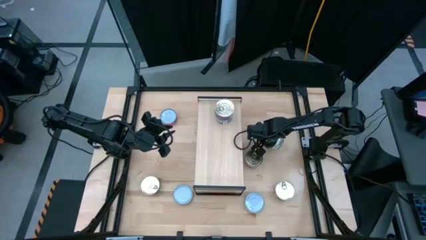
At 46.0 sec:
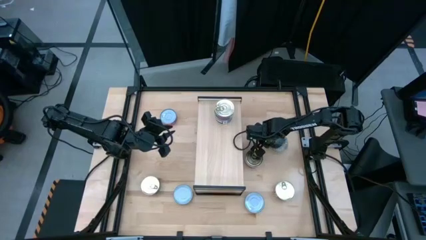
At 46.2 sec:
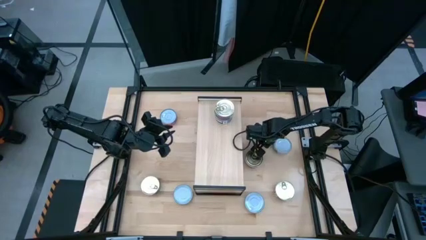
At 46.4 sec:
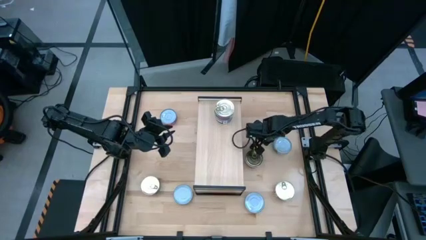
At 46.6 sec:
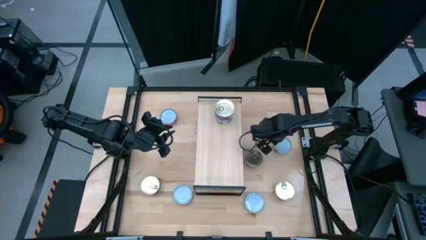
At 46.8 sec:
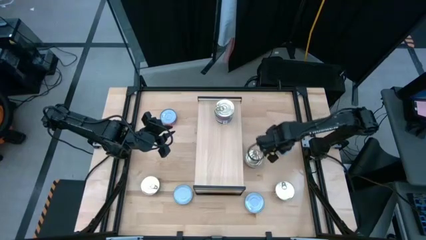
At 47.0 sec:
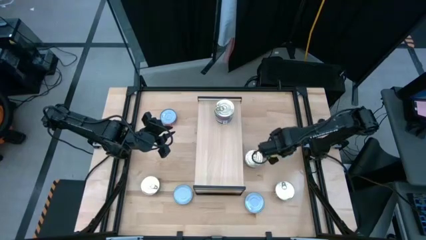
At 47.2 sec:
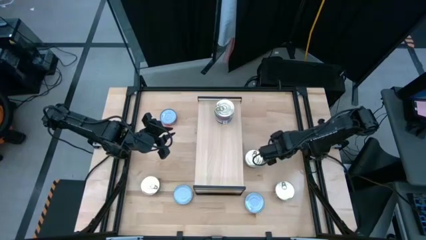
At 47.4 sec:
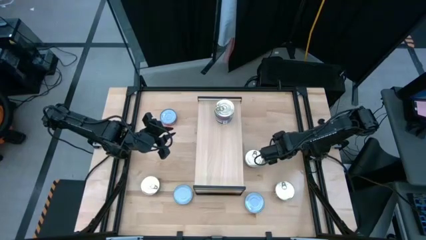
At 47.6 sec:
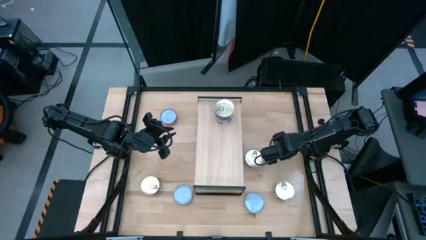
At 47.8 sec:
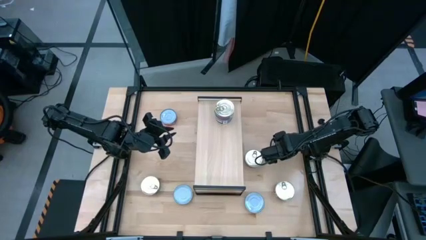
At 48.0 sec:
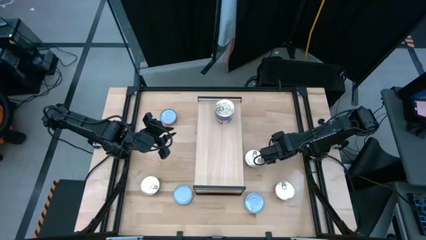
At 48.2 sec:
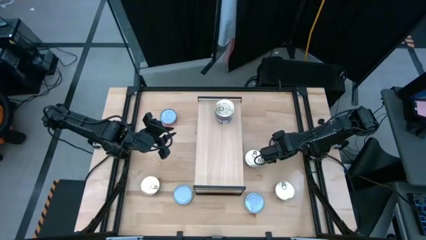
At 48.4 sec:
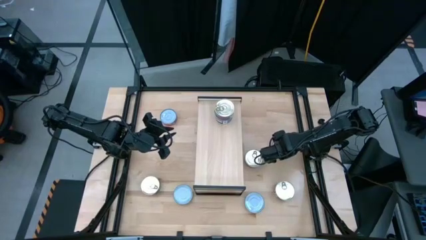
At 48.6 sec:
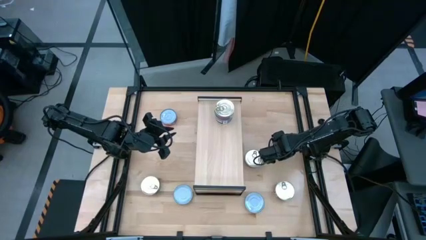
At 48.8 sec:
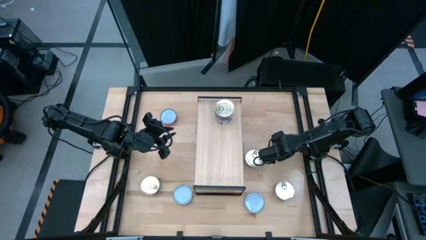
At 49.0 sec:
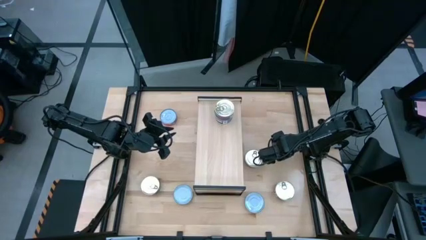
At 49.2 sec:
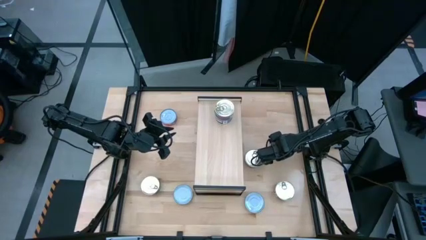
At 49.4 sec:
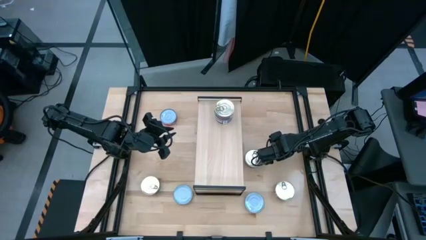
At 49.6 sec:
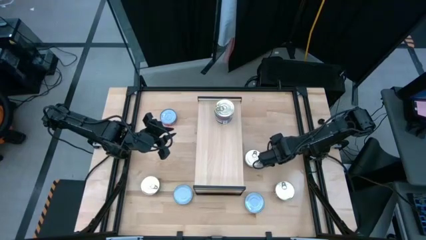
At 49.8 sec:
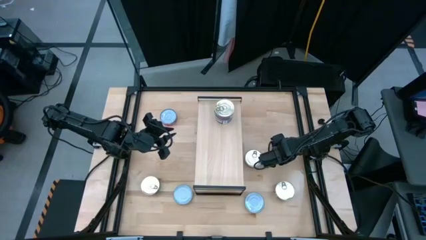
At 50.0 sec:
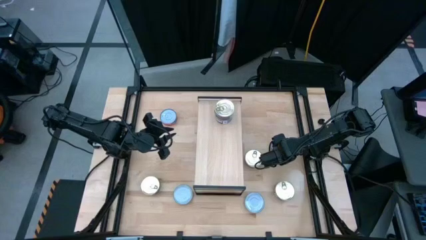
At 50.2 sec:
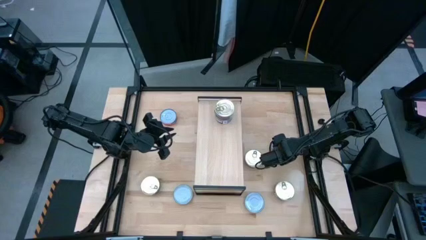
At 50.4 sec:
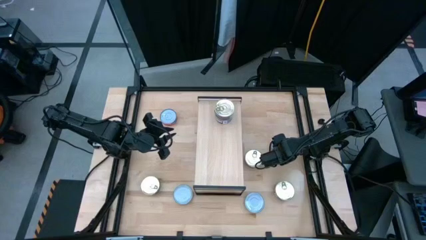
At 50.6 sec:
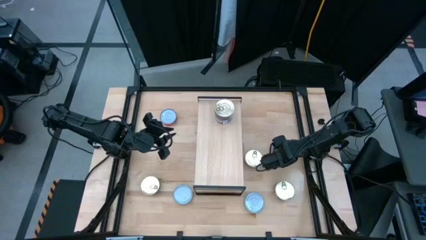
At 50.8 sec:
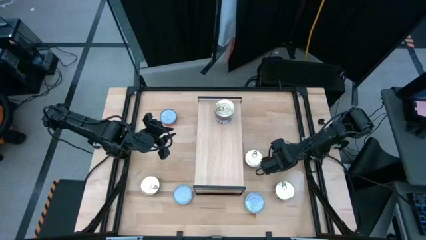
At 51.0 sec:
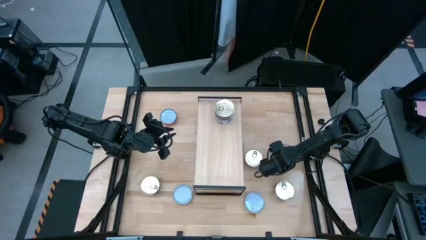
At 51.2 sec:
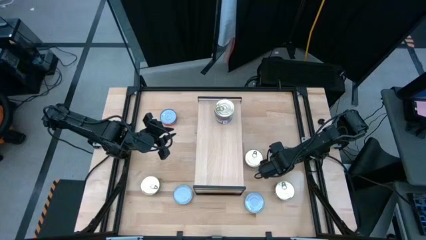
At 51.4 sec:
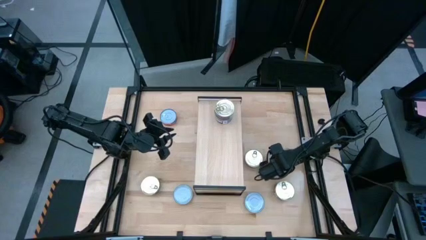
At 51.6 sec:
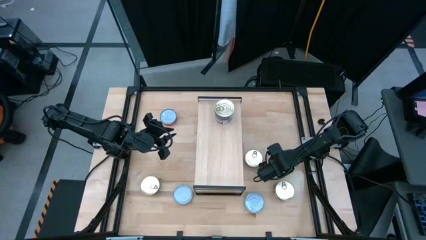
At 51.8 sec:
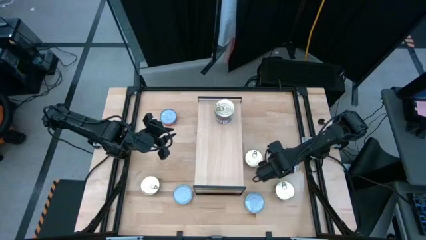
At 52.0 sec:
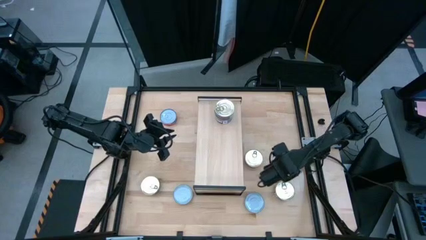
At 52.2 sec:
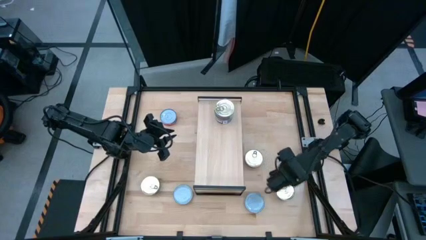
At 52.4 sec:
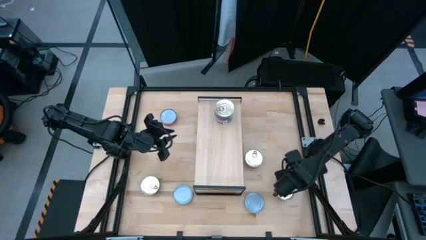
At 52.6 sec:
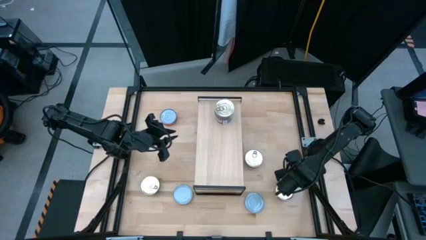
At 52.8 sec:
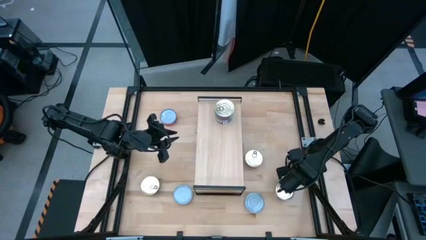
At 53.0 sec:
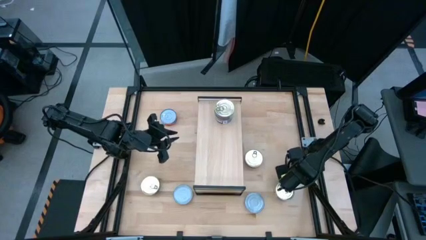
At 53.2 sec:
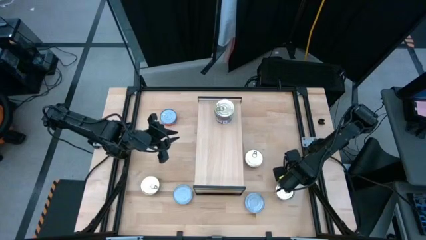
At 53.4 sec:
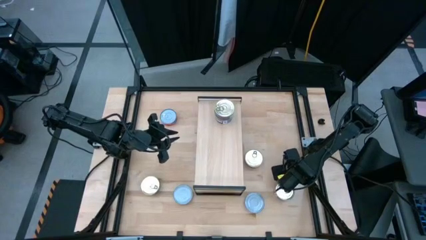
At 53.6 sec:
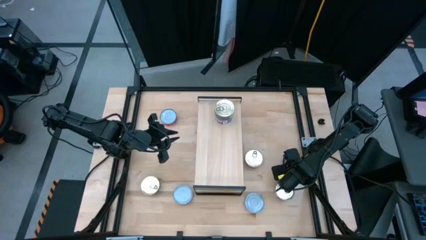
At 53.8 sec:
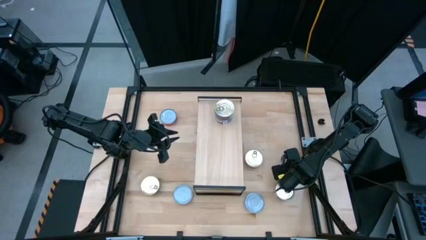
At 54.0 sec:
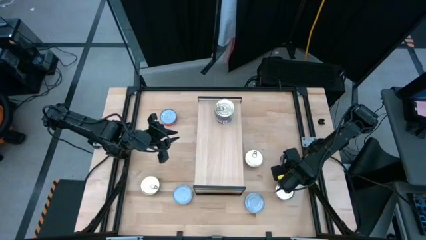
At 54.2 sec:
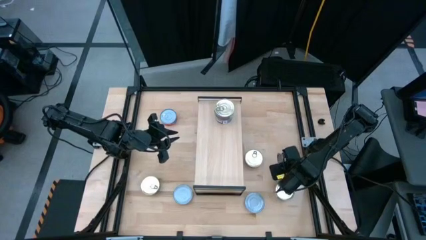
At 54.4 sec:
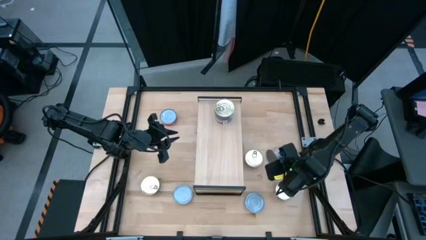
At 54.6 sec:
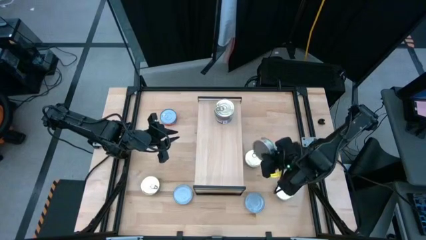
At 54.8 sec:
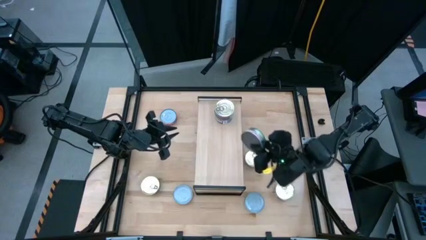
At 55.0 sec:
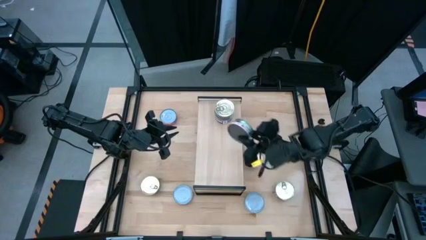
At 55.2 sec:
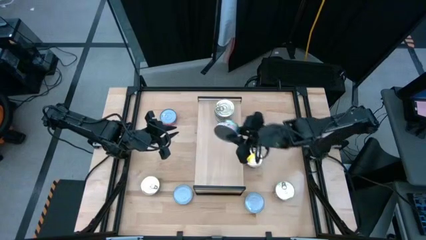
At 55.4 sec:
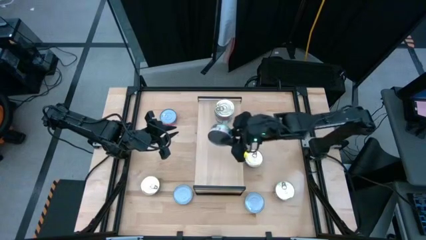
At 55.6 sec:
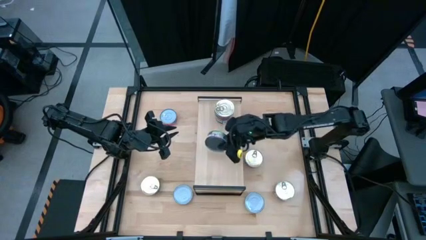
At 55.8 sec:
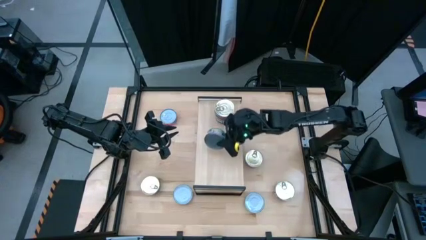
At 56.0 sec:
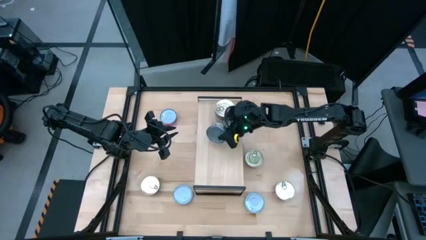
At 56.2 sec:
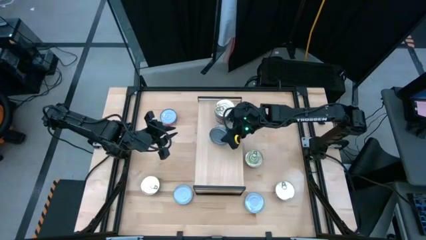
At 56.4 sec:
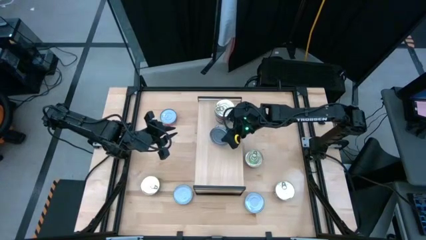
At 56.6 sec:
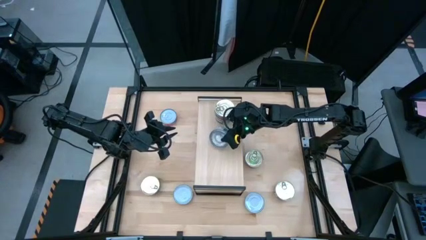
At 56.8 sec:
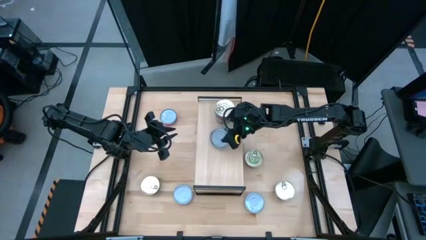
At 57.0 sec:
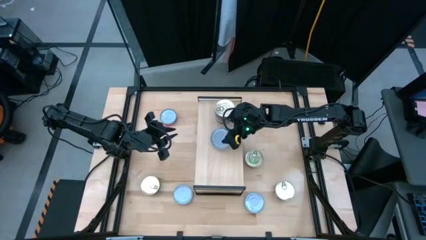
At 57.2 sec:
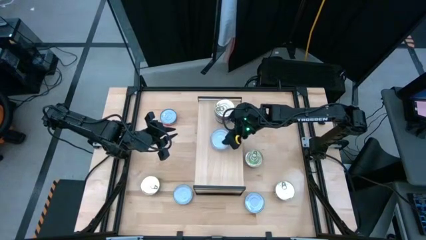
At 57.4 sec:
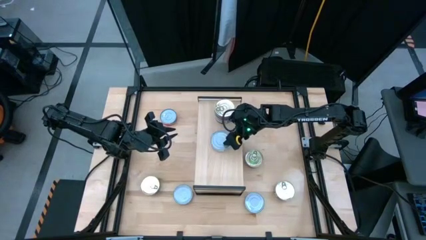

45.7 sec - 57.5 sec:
Task: Stack canned seafood by type on shelf
Put the green white tuna can on the shelf

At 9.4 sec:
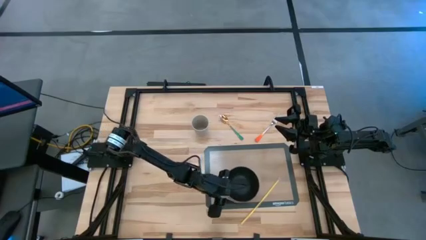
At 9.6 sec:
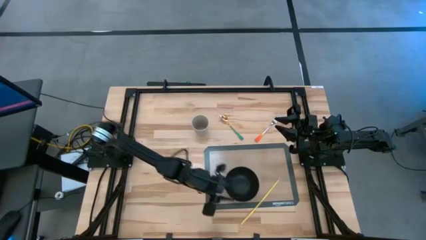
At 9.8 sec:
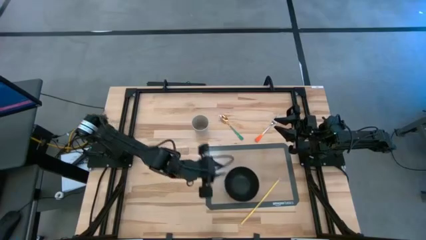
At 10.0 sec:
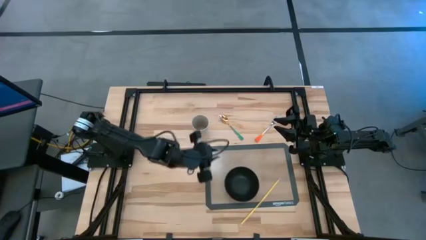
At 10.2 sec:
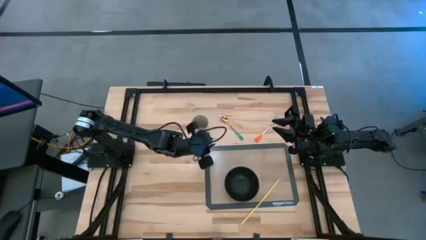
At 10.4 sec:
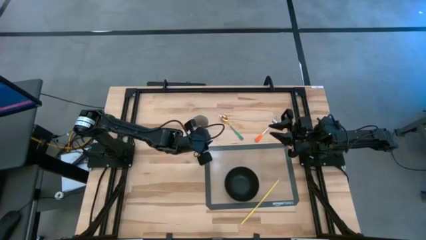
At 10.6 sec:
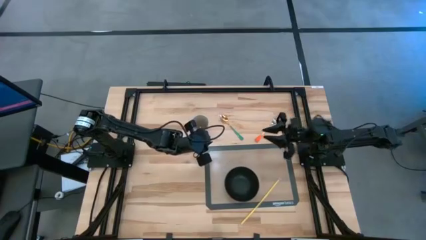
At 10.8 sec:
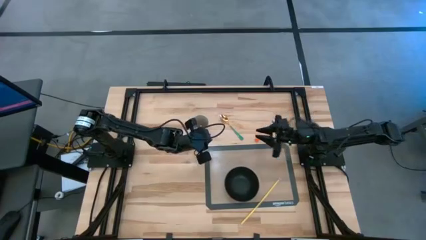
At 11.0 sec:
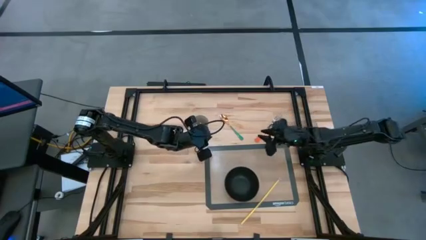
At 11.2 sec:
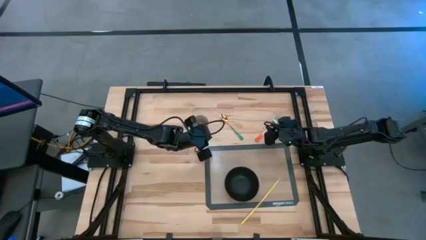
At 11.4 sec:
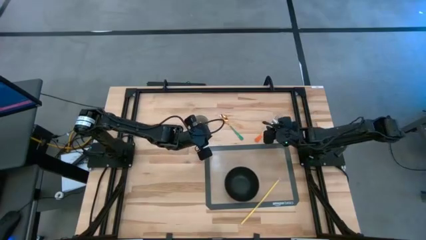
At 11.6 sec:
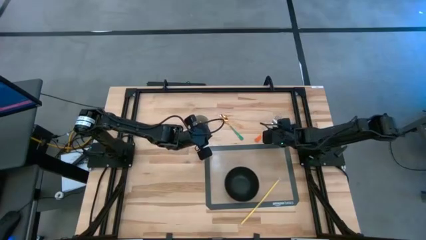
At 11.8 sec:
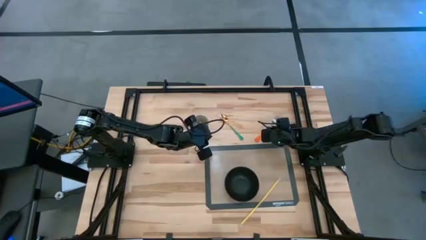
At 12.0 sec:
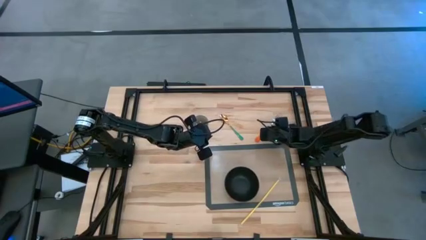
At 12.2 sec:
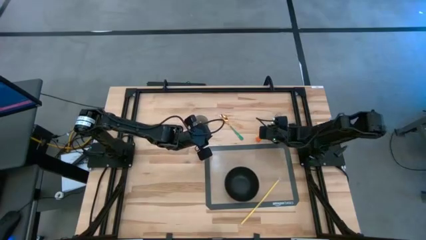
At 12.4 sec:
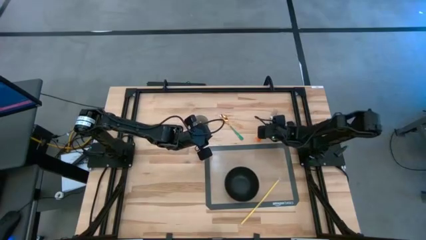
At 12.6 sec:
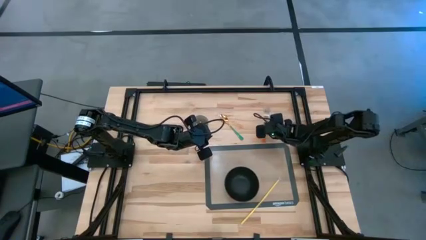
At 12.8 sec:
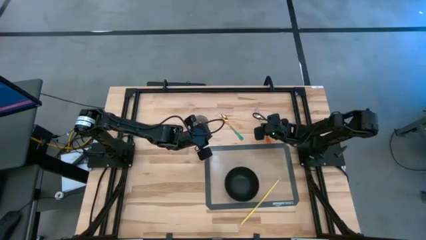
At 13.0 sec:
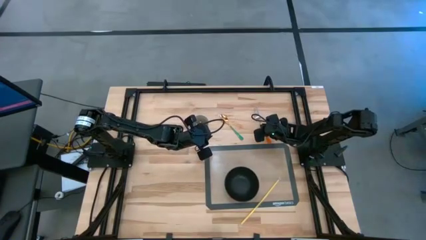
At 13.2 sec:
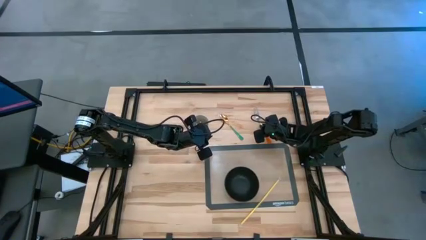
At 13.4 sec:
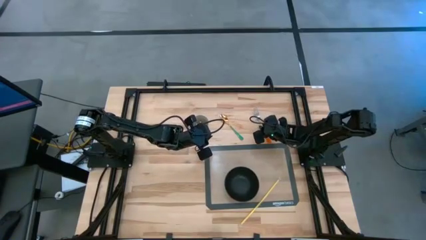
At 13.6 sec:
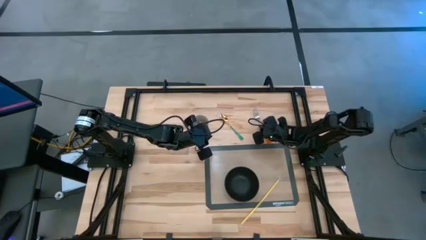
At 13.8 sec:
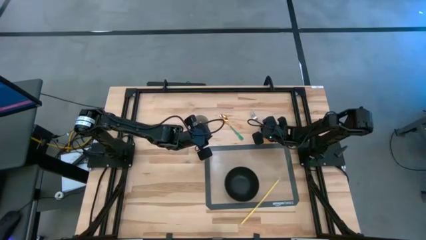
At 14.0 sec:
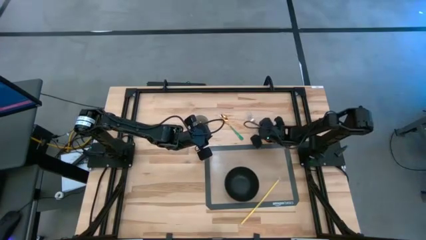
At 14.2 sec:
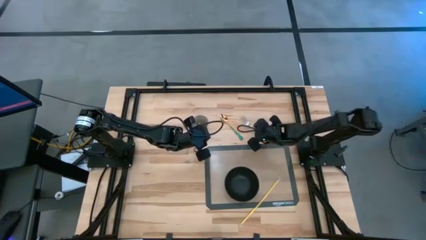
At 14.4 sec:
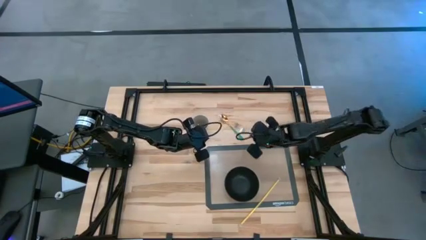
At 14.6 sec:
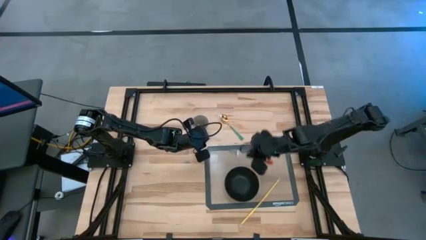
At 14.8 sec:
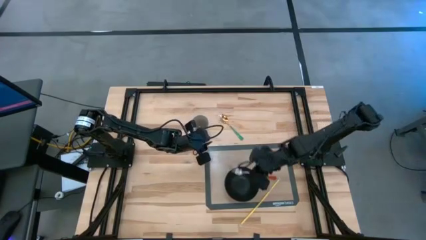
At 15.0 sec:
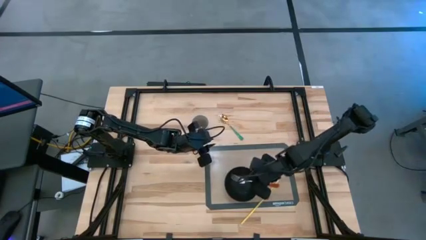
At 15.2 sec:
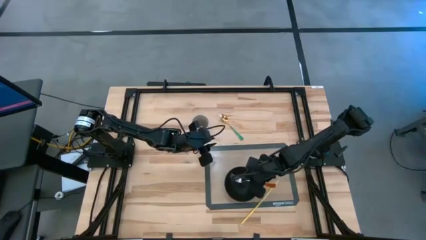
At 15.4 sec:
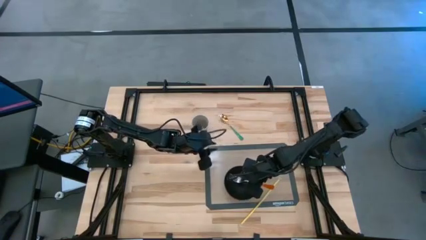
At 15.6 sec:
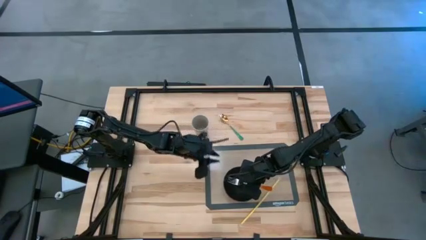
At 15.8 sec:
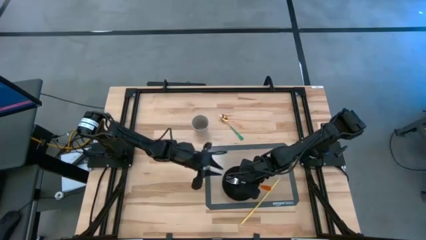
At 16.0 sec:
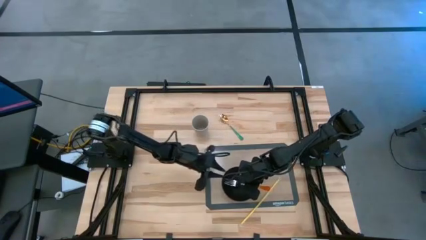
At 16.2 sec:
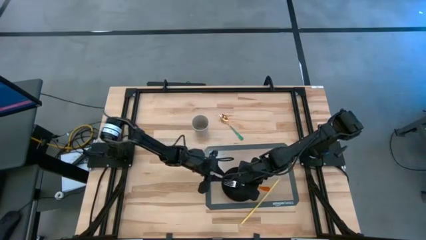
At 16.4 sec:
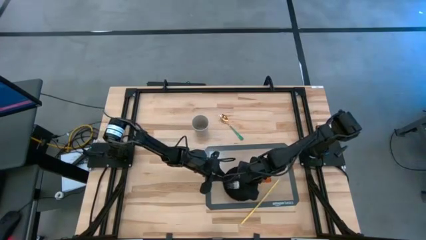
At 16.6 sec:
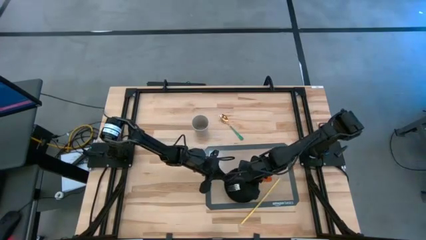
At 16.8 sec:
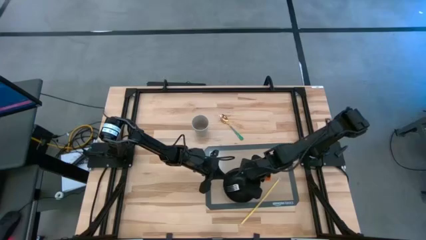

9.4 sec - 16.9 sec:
Task: Pick & Place Utensil
Put the orange fork into the black bowl
